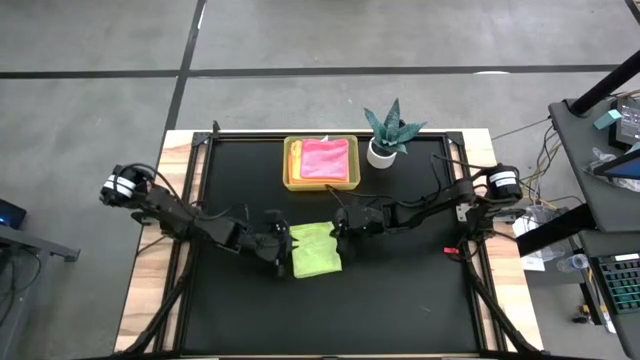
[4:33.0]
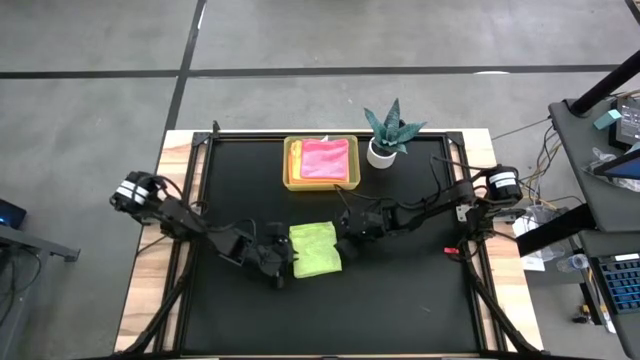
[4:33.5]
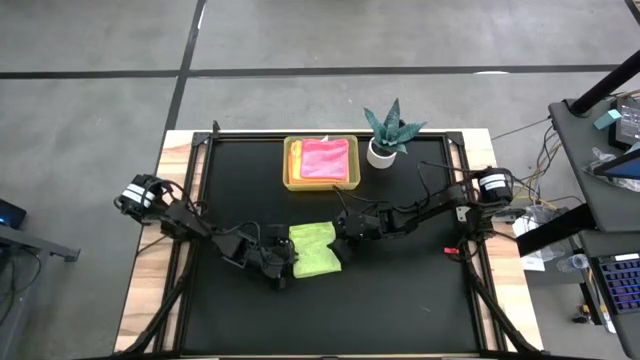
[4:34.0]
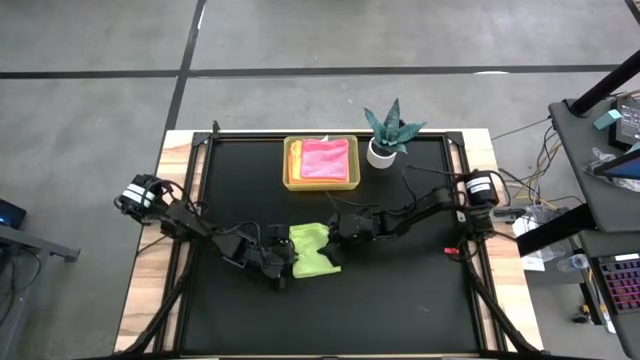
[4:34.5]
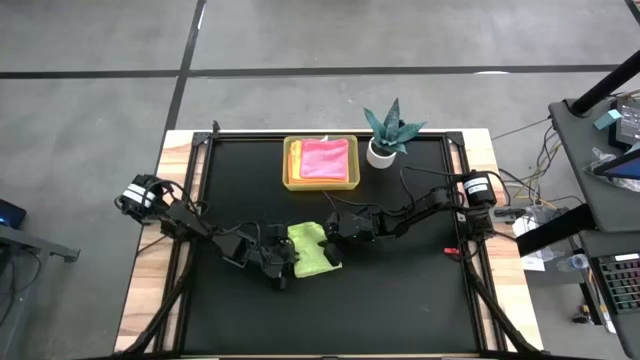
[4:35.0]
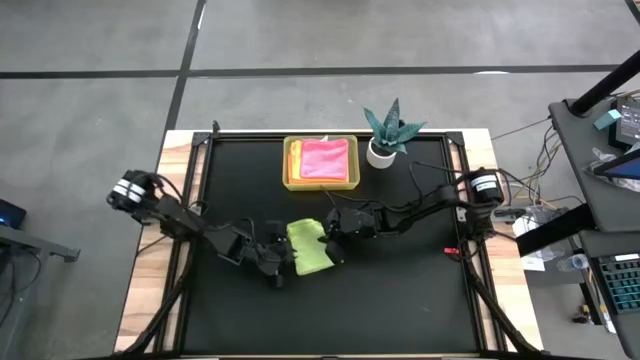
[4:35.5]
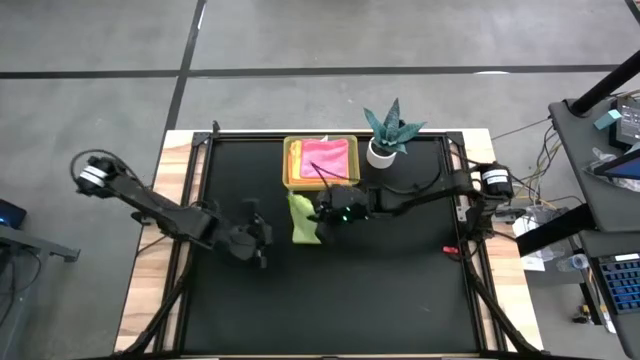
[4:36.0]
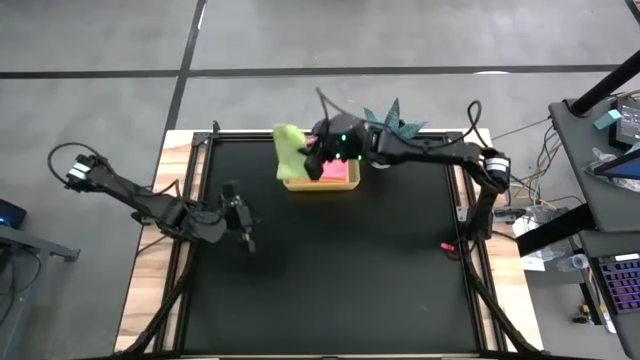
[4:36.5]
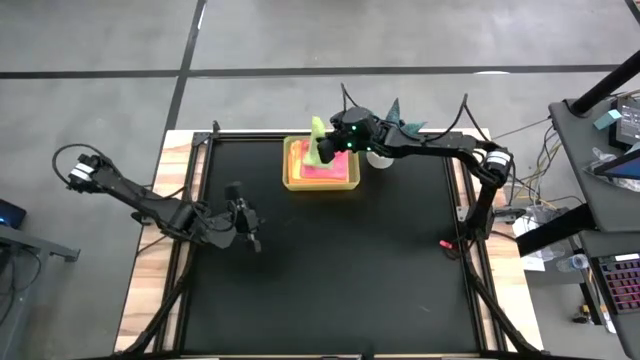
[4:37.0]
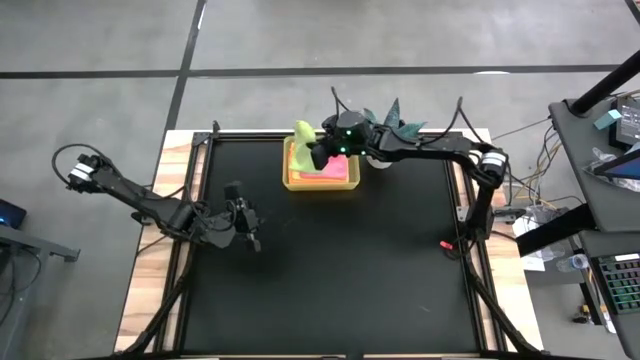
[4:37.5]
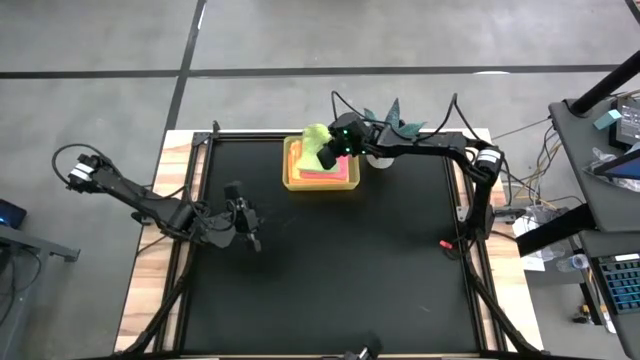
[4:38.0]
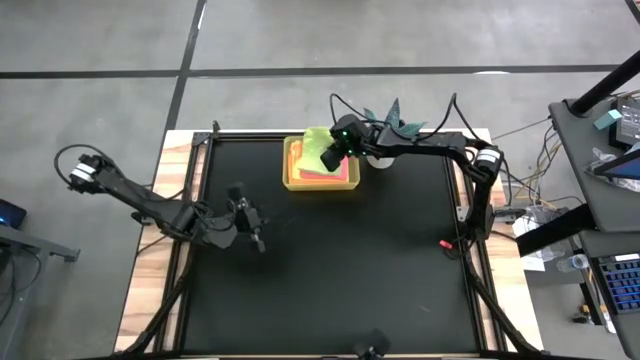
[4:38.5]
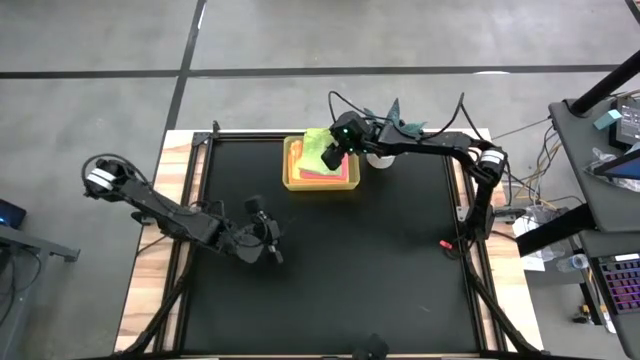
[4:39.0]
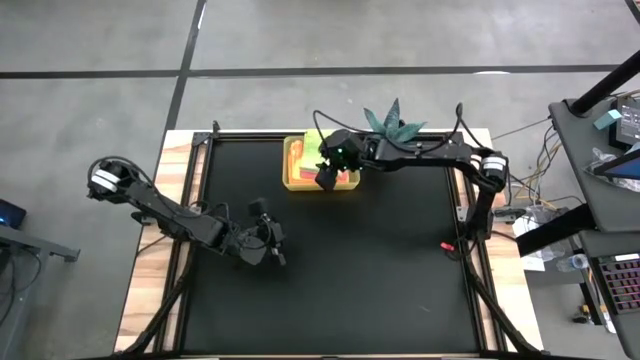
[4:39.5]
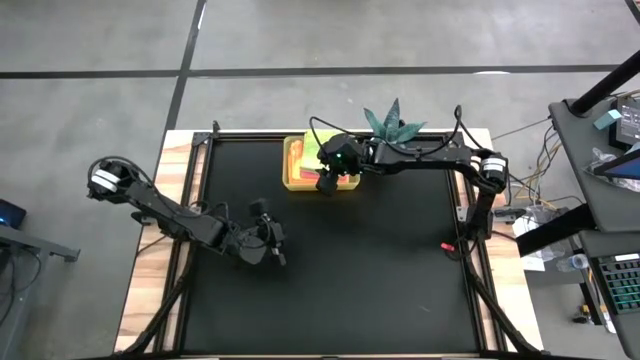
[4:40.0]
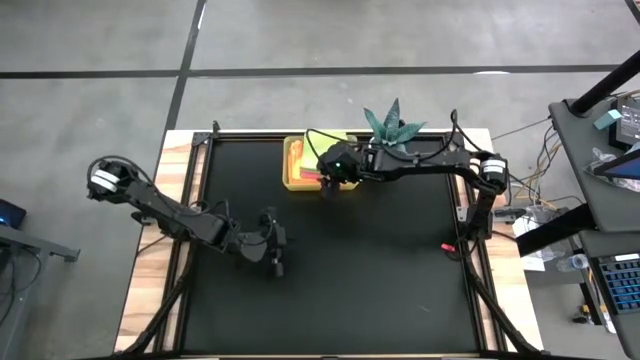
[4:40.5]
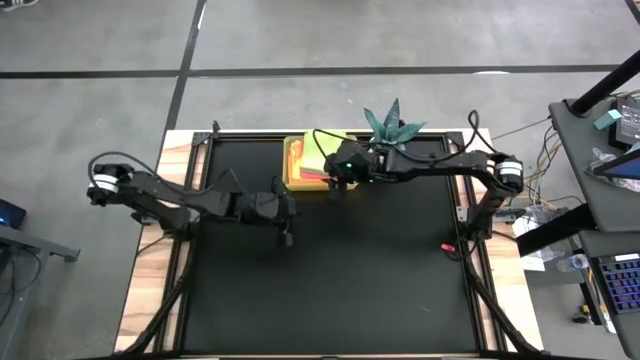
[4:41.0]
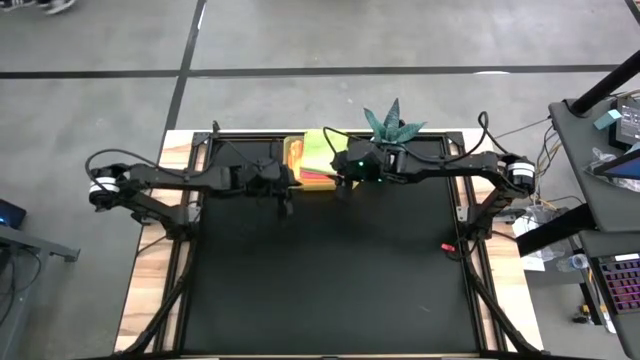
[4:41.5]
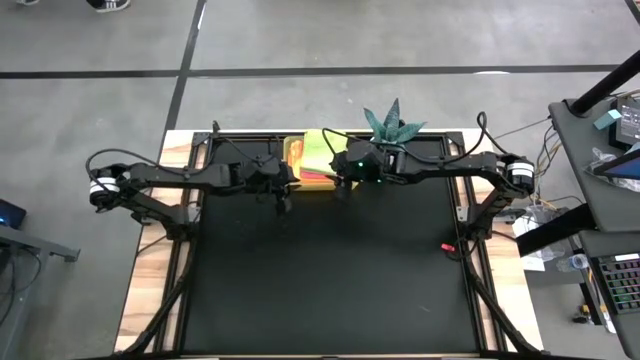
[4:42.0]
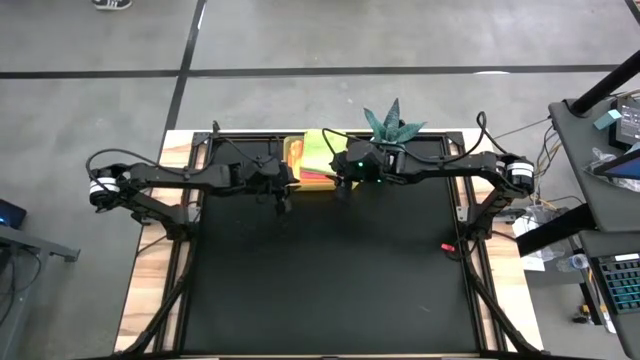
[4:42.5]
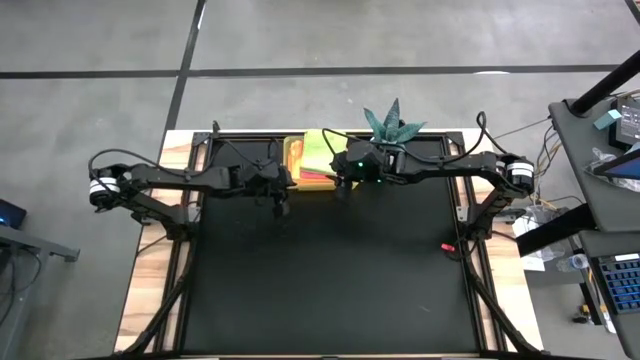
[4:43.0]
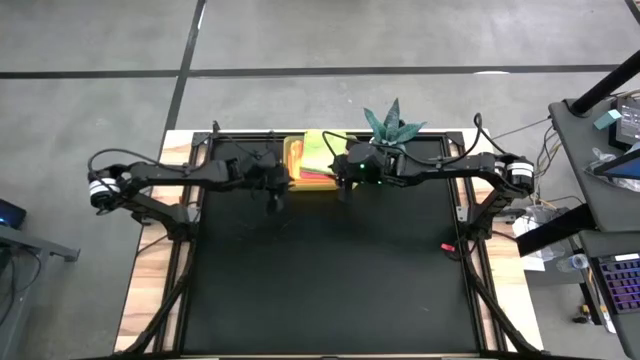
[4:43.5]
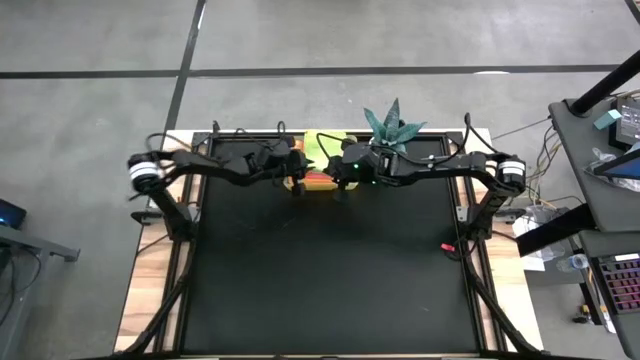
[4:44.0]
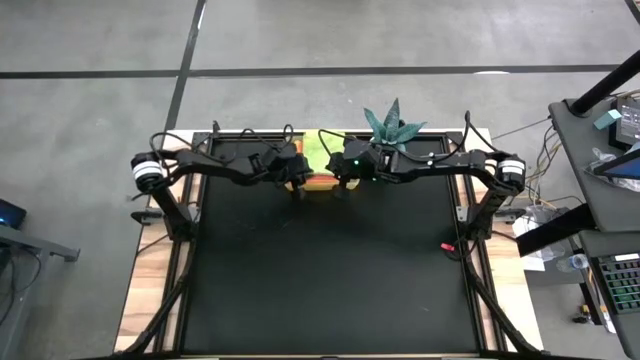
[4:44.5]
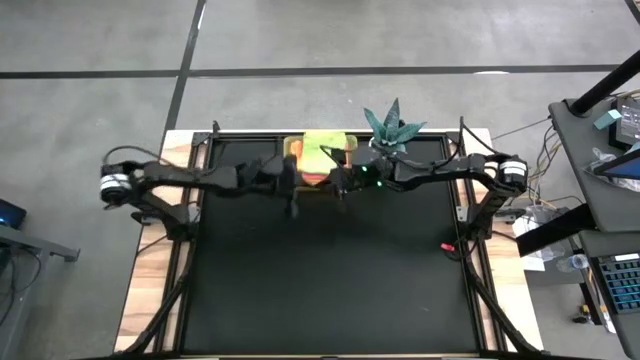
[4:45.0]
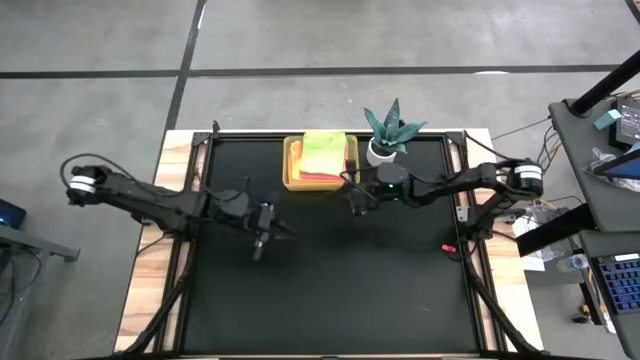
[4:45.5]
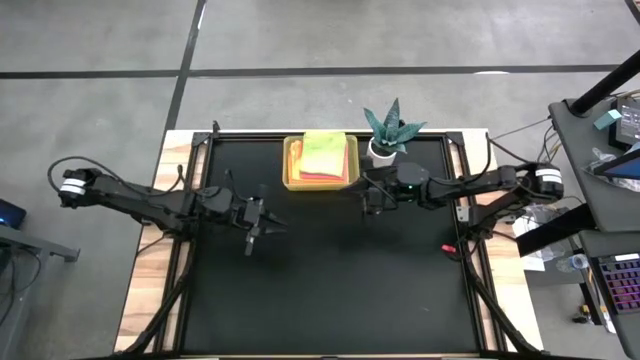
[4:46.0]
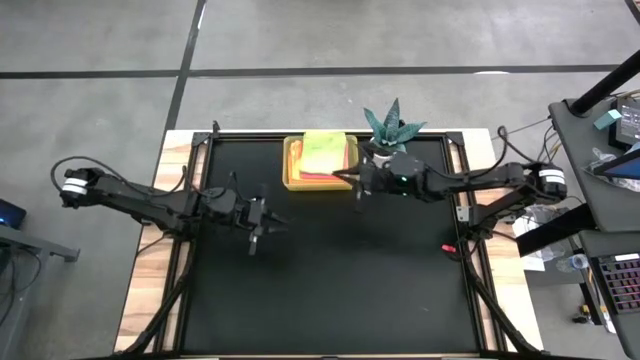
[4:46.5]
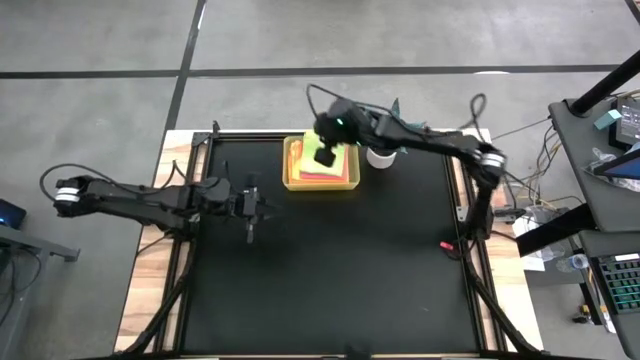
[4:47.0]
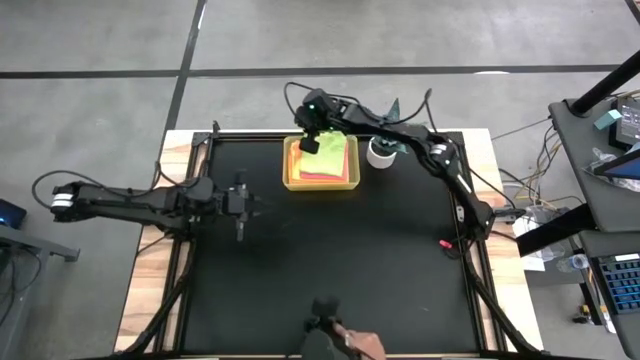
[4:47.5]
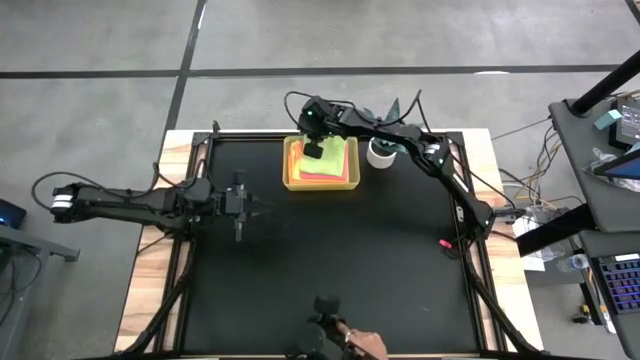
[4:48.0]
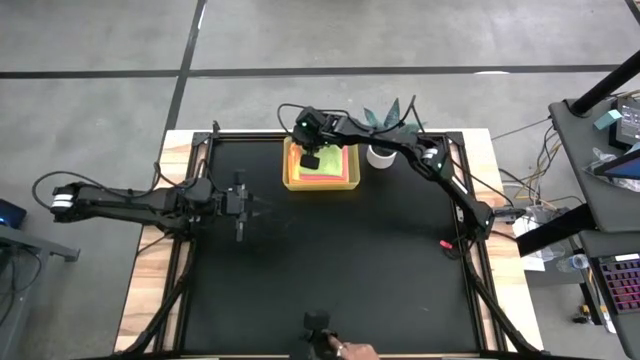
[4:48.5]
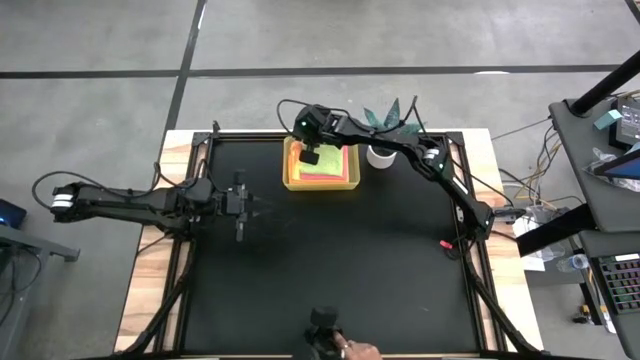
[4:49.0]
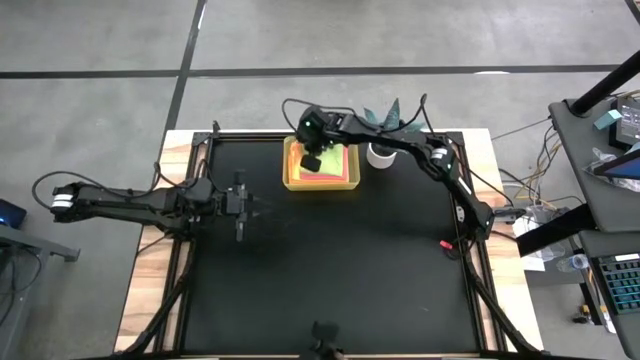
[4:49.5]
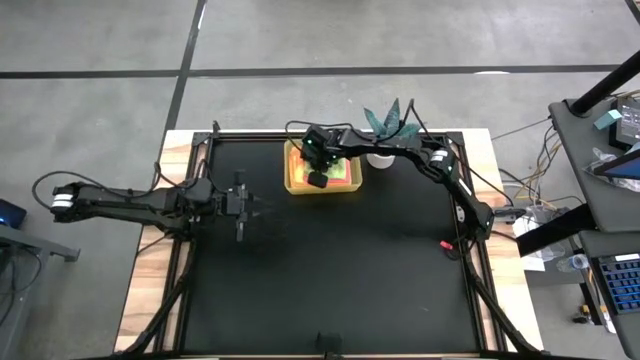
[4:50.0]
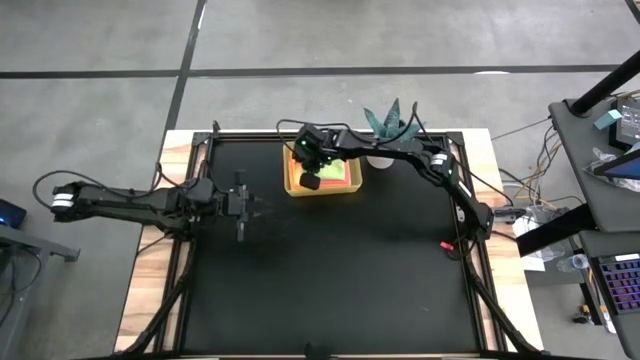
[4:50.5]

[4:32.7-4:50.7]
Task: Fold microfiber towels
Put the green microfiber cloth into the yellow bin

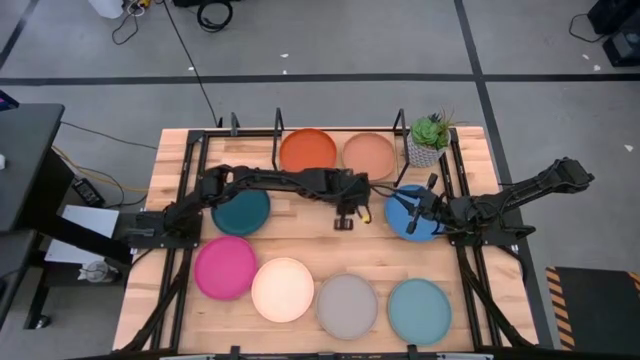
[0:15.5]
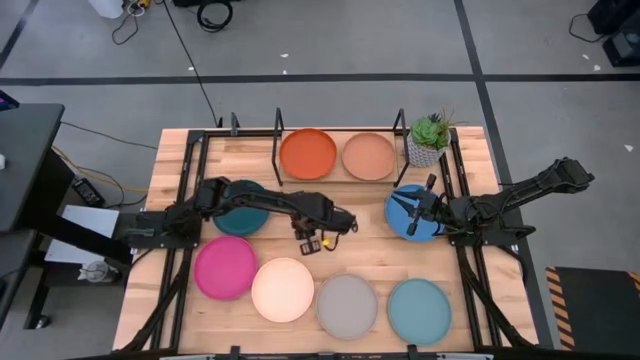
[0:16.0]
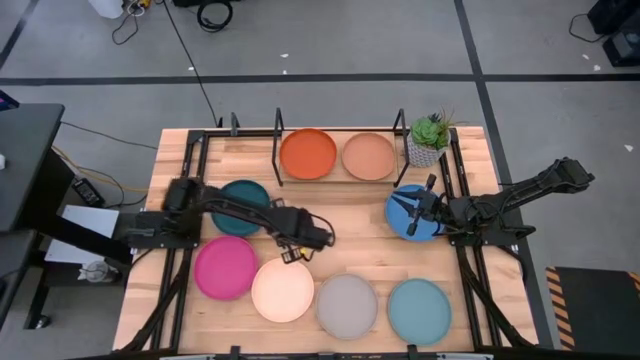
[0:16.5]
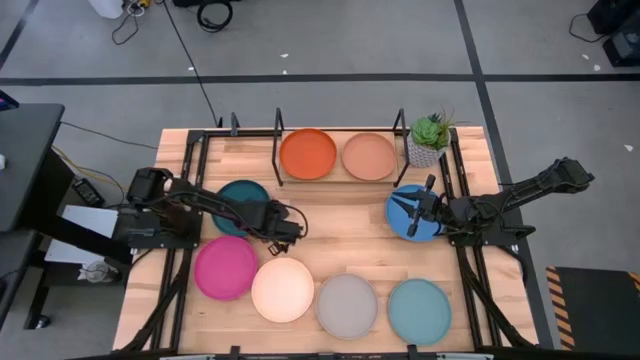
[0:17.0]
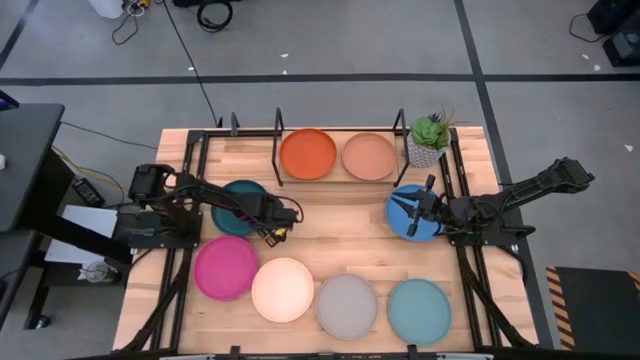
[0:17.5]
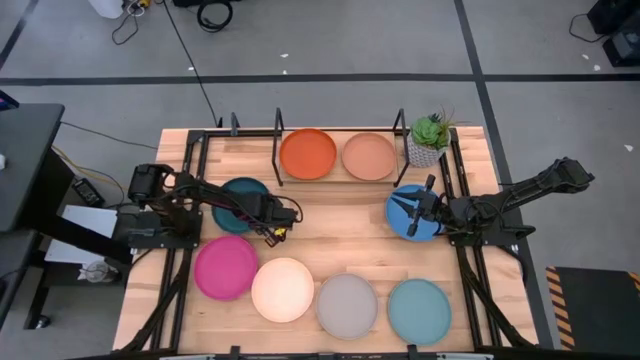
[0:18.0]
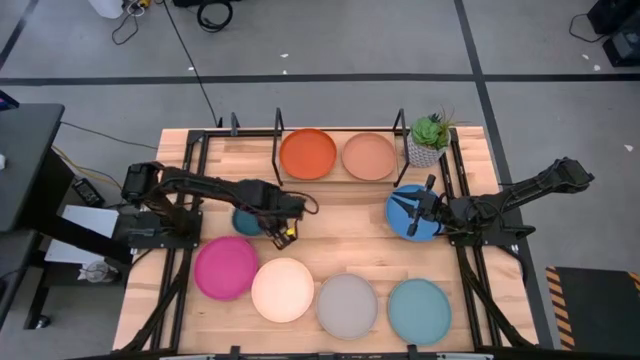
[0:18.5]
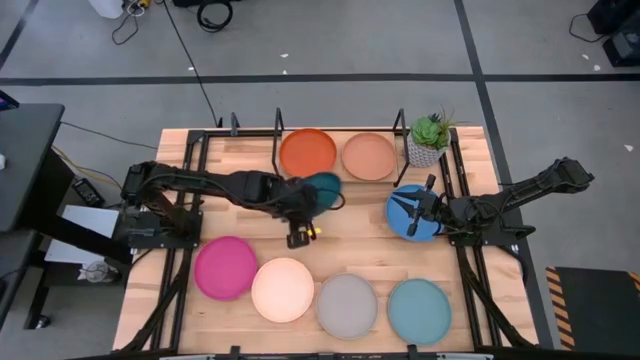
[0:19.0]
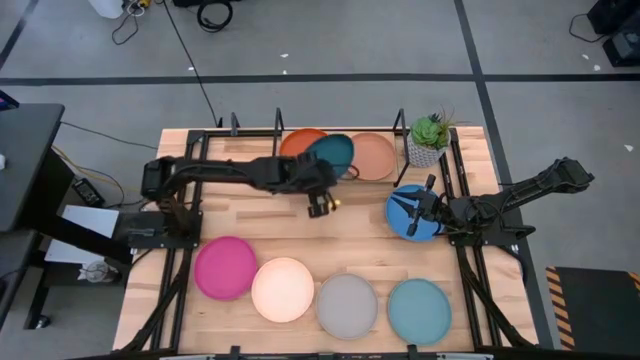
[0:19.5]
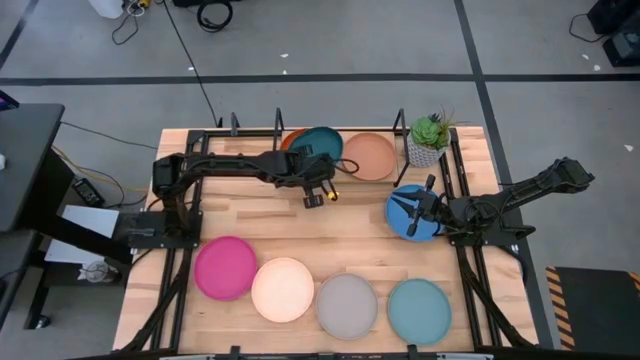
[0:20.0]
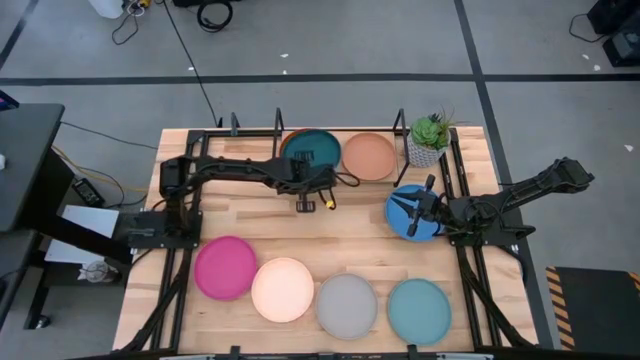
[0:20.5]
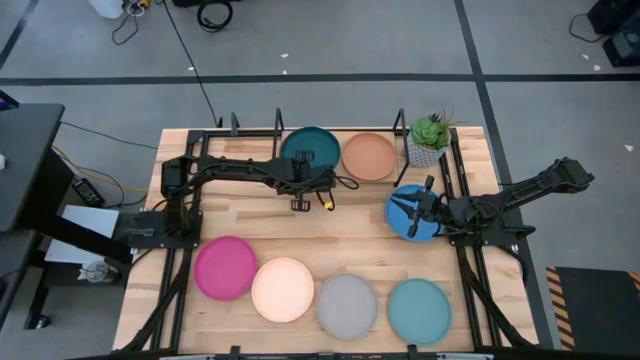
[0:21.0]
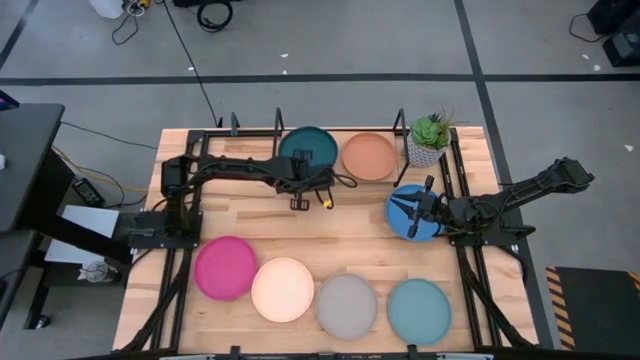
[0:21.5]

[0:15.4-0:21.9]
Task: Place and stack plates onto a shelf
Stack the dark blue plate on the top of the orange plate on the shelf
